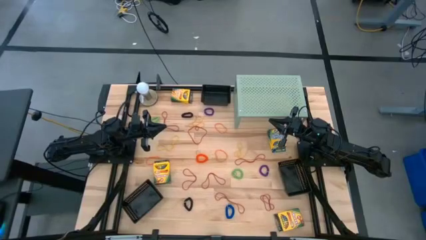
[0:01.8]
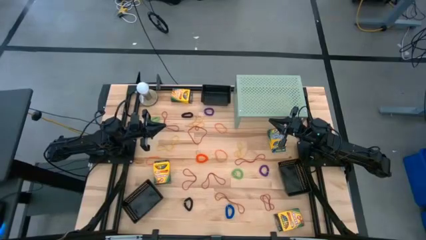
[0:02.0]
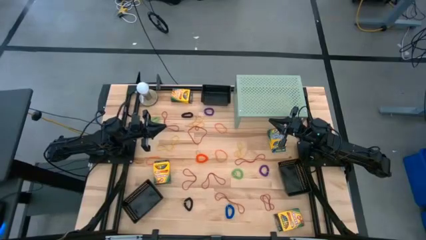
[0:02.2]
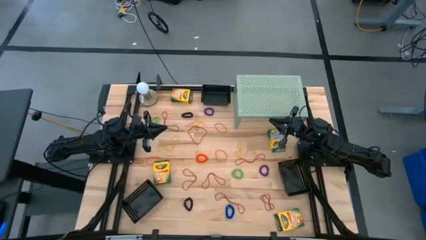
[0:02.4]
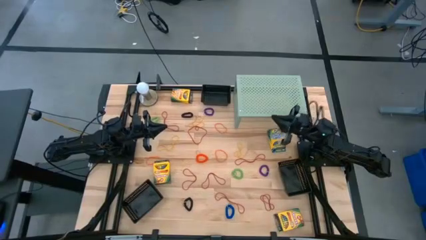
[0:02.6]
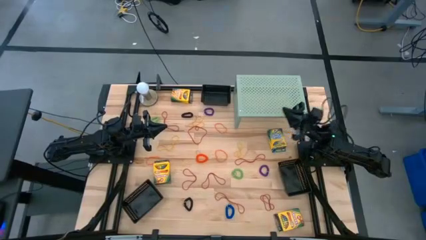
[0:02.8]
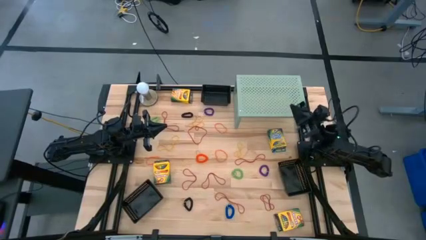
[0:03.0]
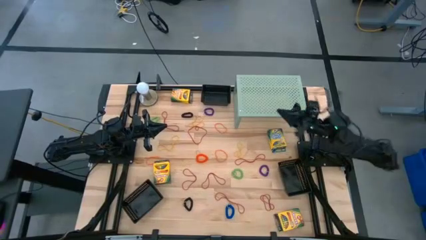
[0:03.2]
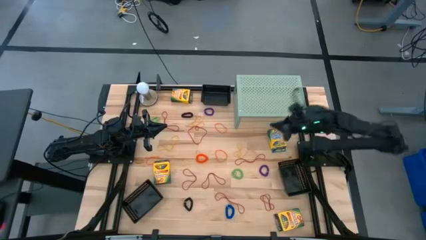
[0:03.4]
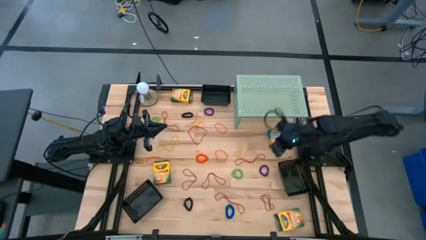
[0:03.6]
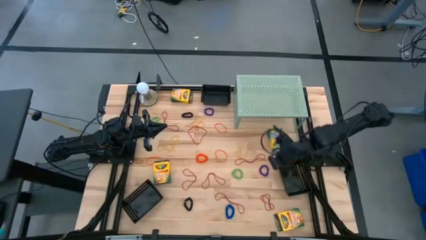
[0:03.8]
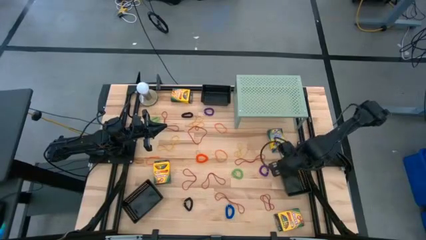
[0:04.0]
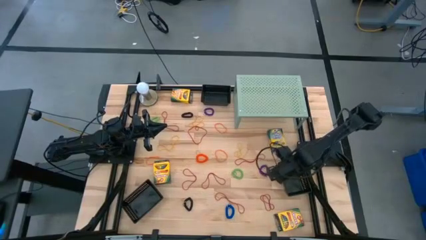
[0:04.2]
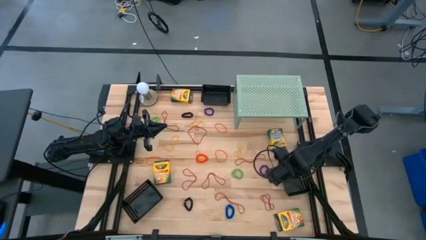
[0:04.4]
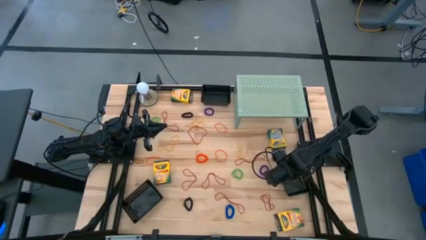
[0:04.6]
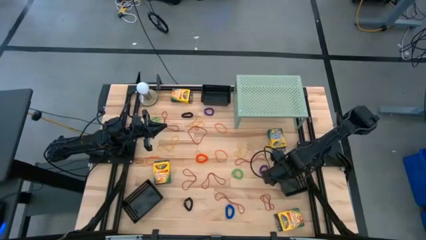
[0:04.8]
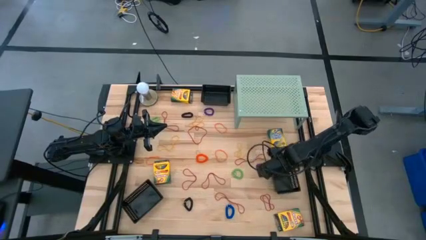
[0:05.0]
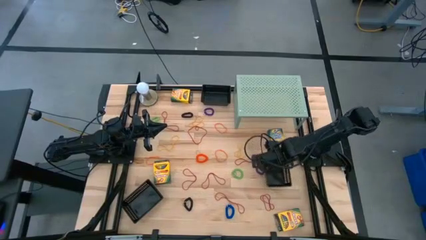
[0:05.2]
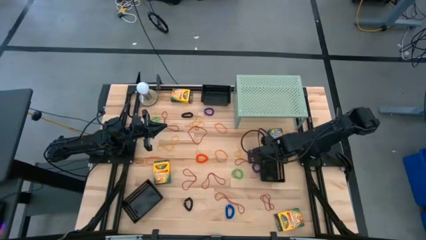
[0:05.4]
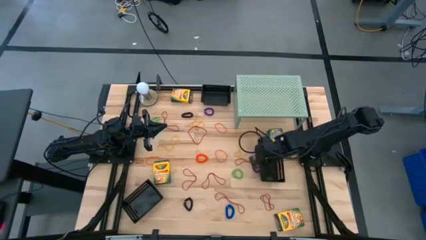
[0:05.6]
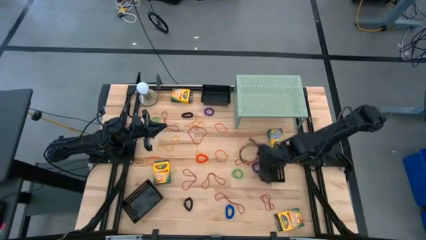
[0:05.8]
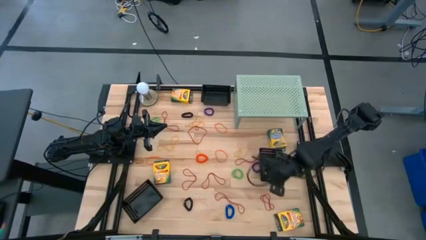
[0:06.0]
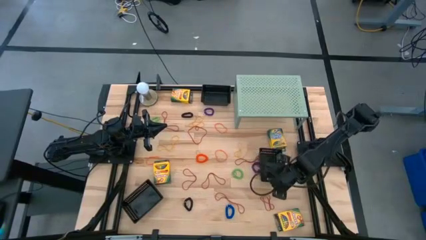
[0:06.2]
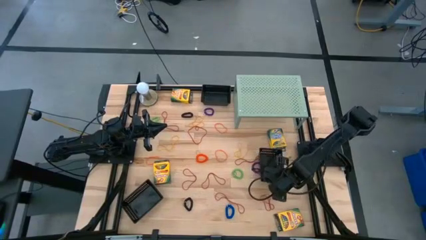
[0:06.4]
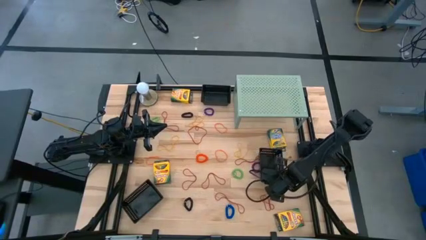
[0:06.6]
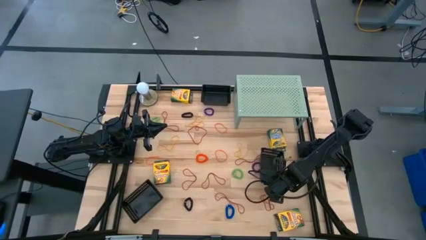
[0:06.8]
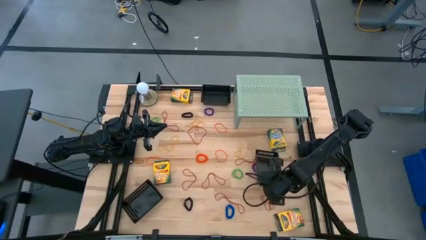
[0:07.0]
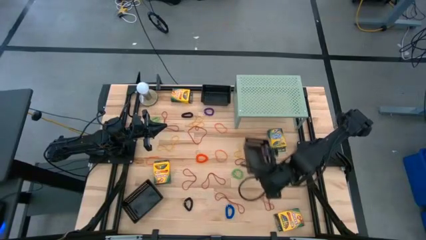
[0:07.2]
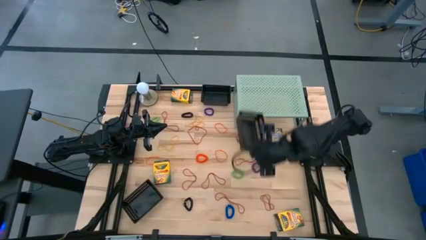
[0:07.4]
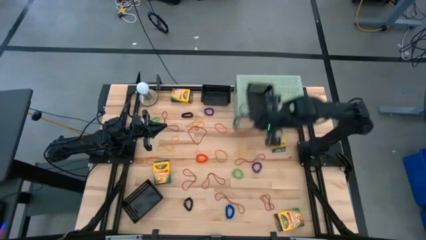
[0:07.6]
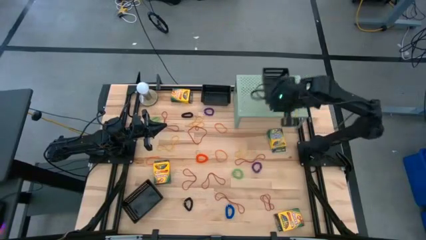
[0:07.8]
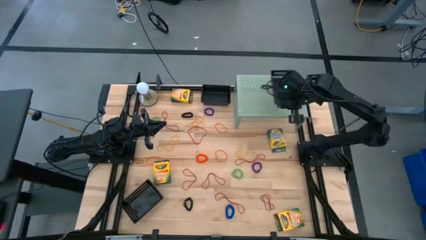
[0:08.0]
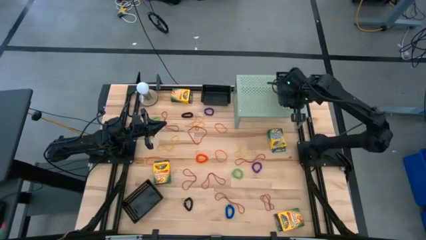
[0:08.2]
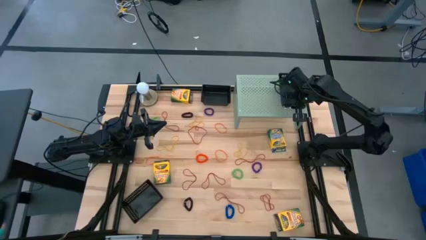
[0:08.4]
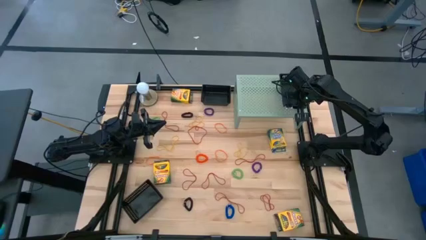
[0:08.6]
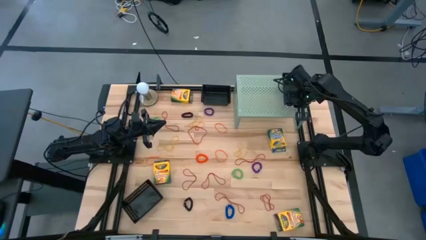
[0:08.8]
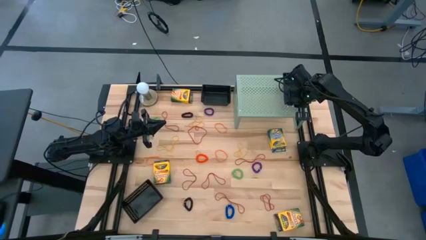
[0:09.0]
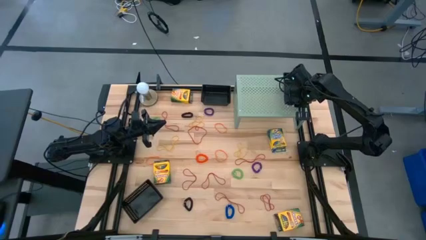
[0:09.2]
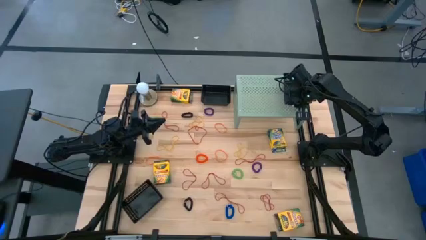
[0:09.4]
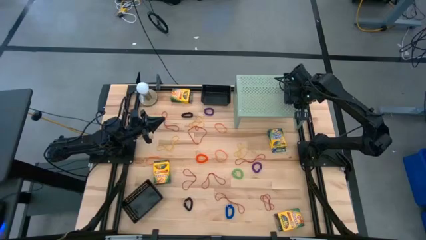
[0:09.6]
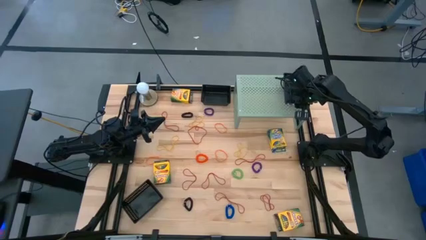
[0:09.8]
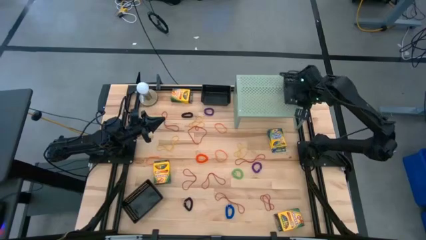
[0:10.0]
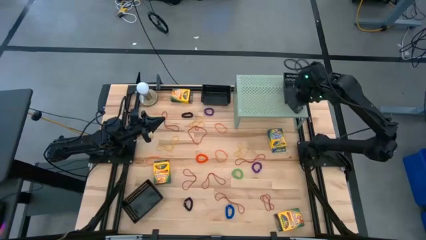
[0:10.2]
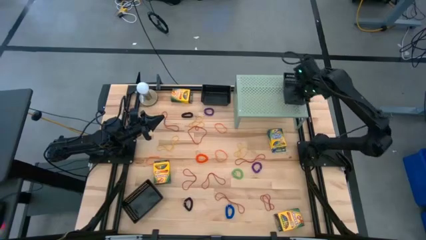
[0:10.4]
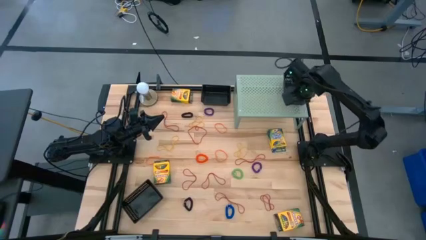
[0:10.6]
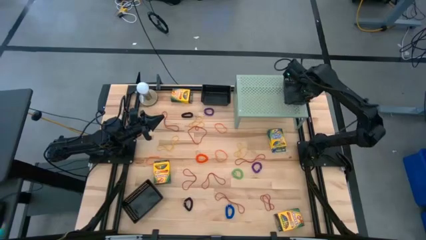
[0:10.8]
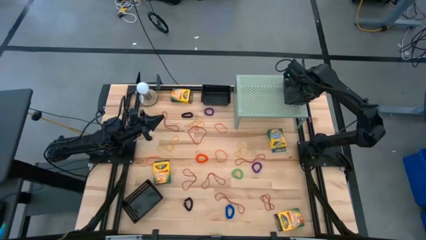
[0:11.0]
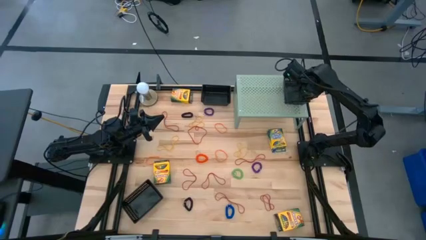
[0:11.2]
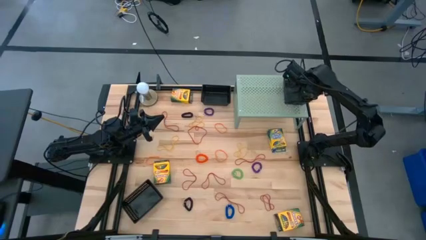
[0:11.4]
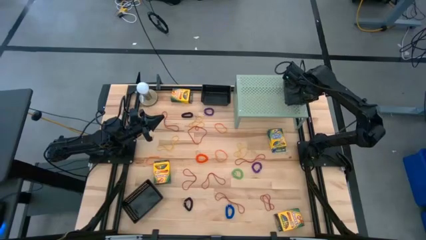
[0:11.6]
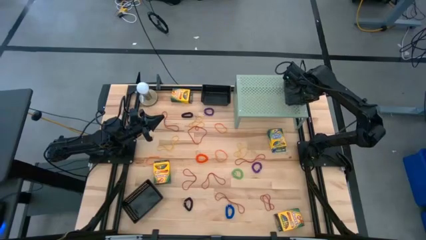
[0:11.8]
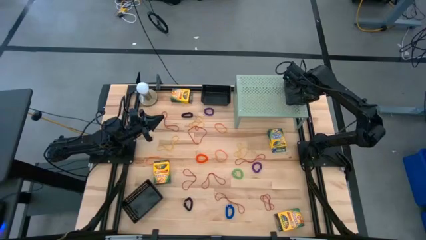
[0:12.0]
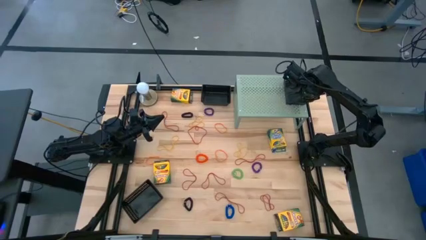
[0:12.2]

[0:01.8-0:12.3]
Task: Pick & Place Office Desk Supplies
Put the middle black basket on the shelf on the shelf
